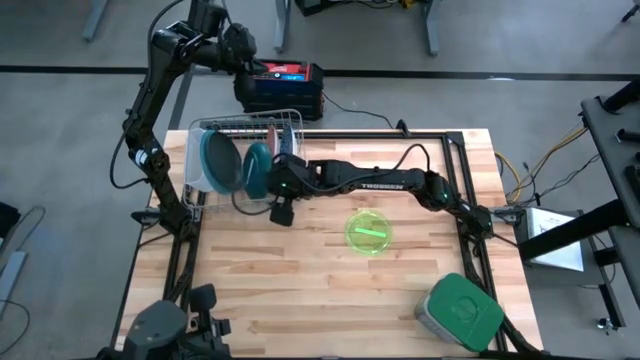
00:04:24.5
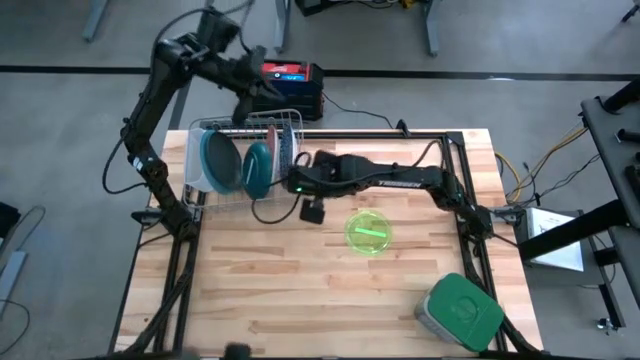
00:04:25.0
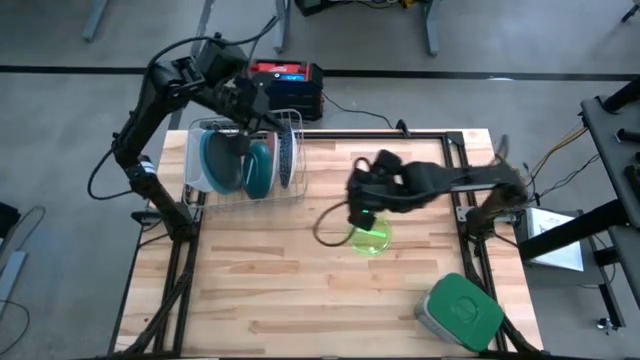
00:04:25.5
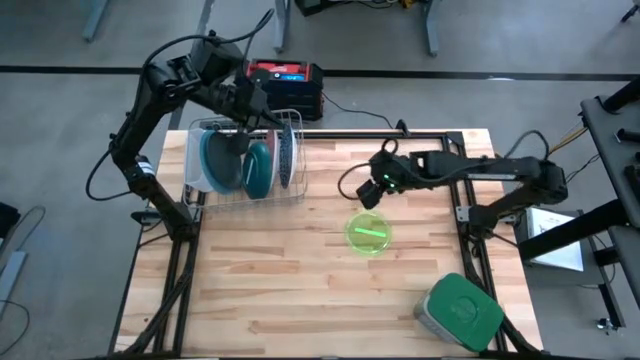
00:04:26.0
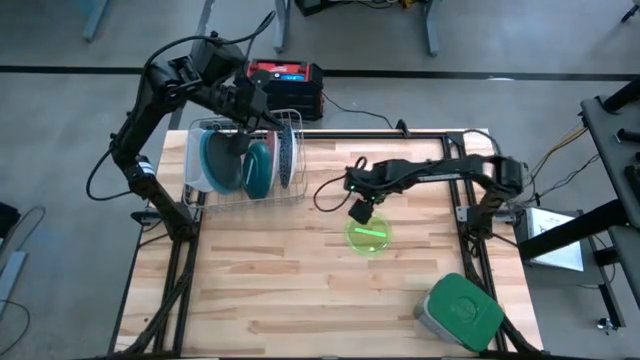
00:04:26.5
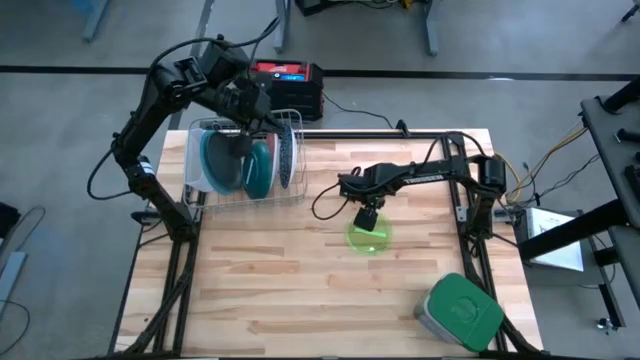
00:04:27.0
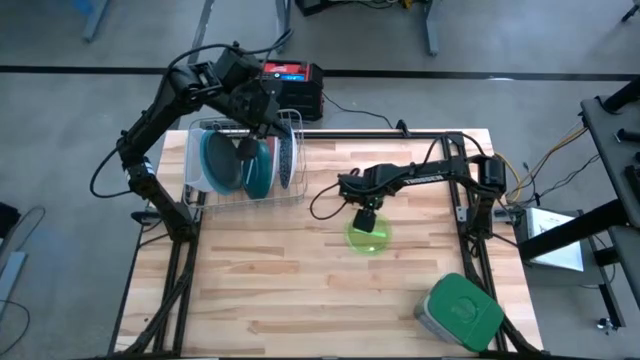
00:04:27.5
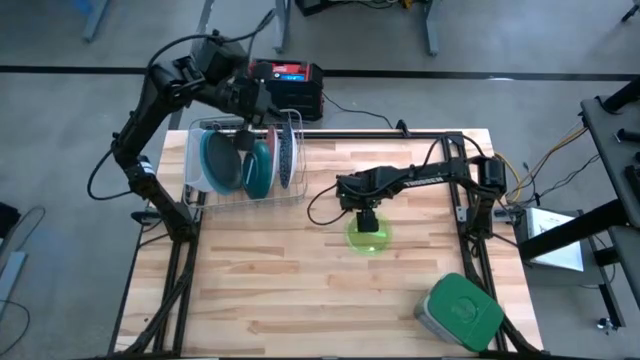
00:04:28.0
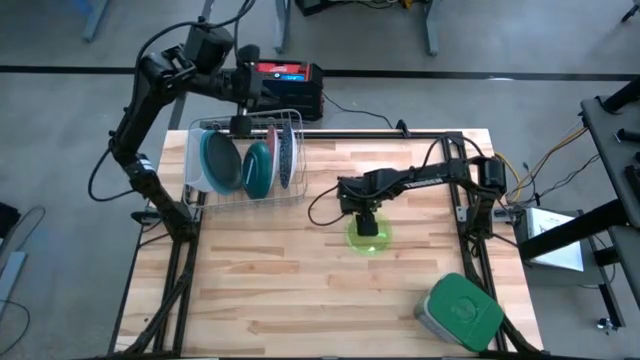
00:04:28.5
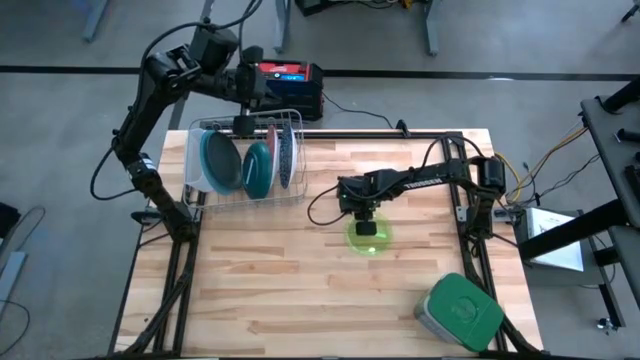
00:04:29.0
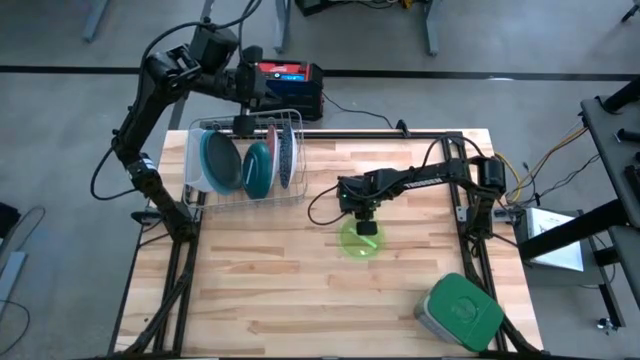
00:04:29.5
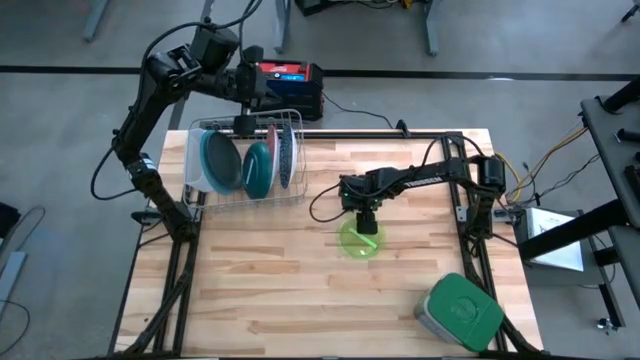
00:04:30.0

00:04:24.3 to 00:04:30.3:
Task: Sort dishes
Put the light green plate into the dish rack

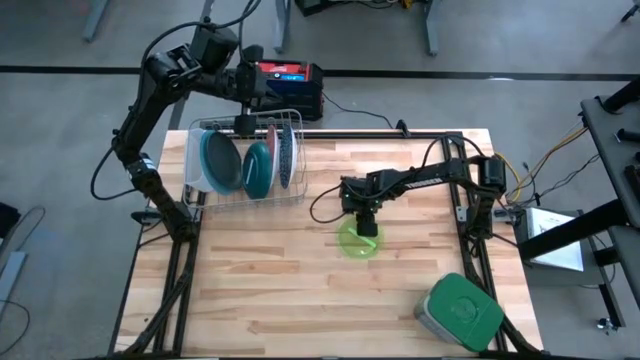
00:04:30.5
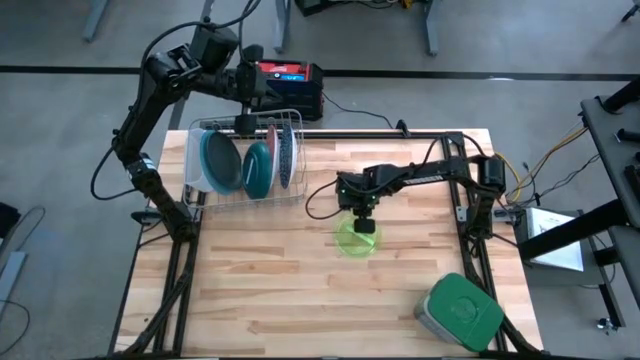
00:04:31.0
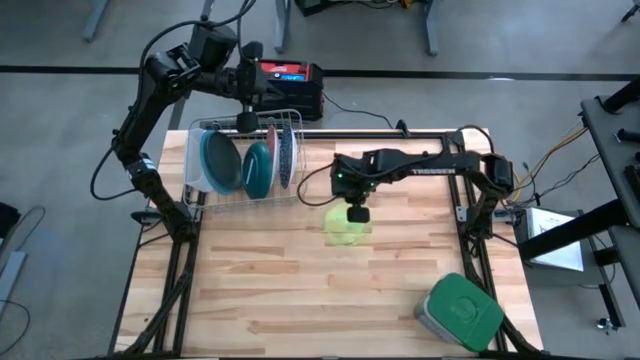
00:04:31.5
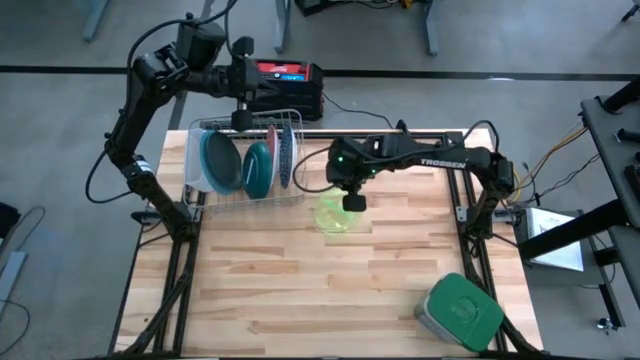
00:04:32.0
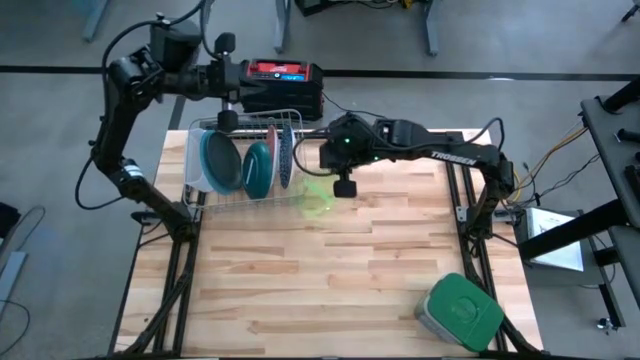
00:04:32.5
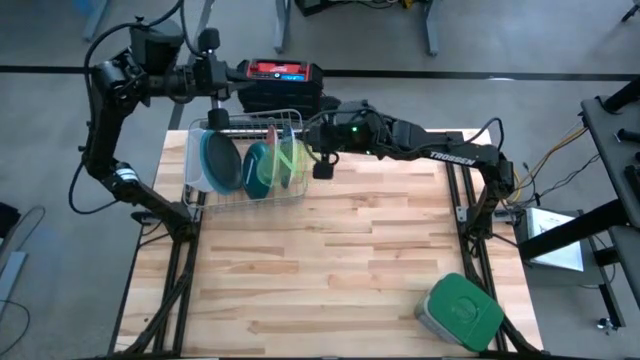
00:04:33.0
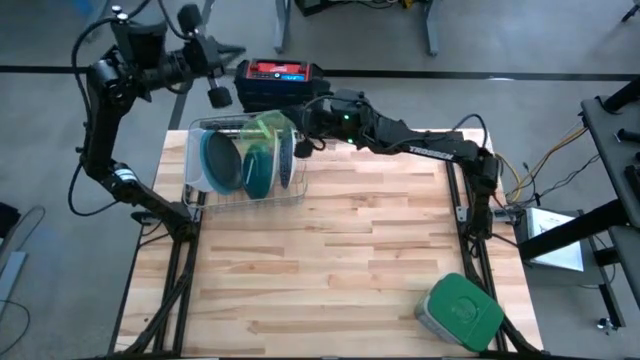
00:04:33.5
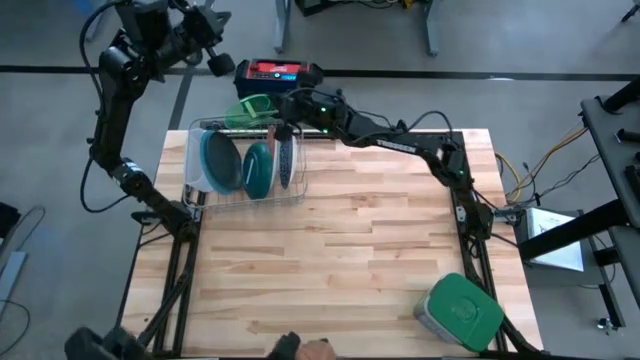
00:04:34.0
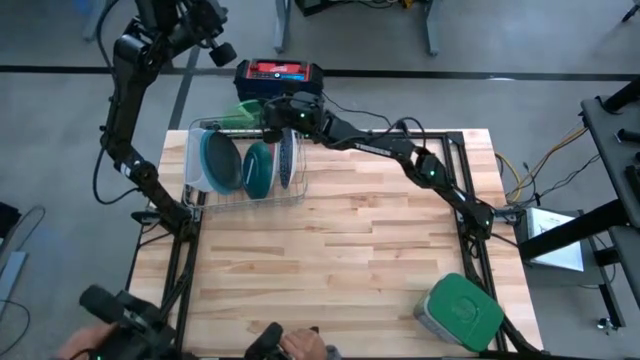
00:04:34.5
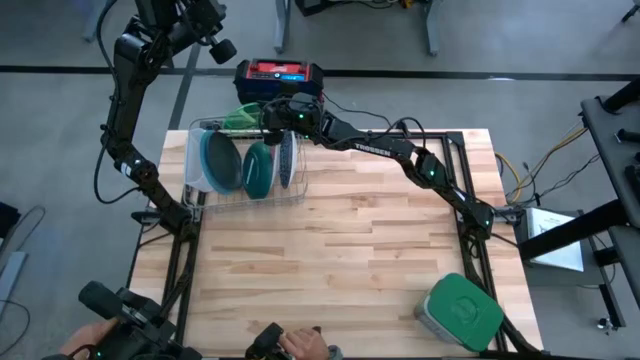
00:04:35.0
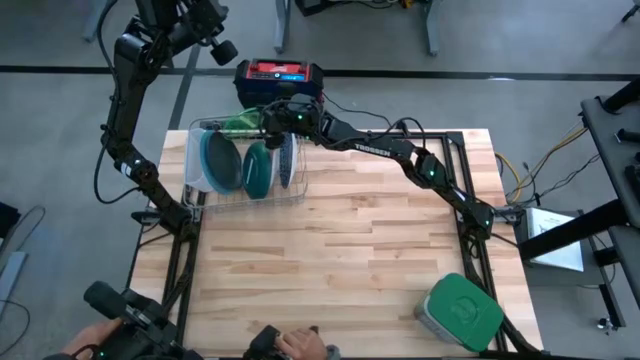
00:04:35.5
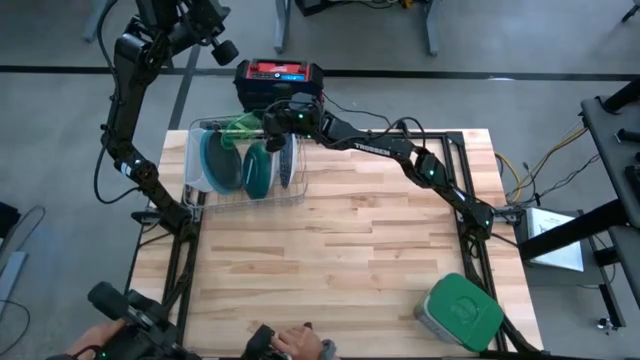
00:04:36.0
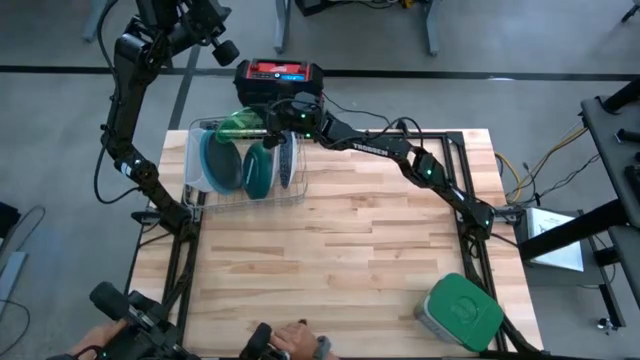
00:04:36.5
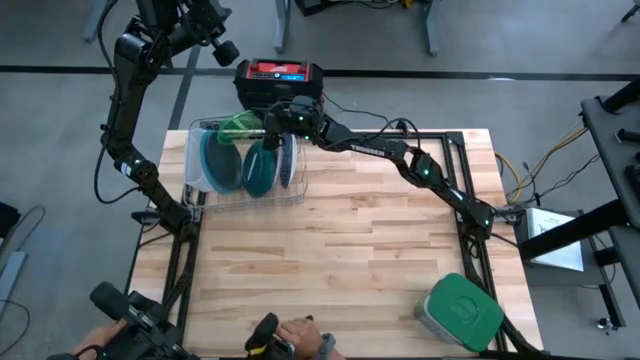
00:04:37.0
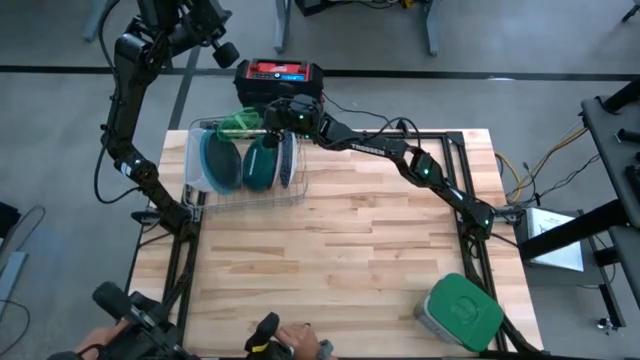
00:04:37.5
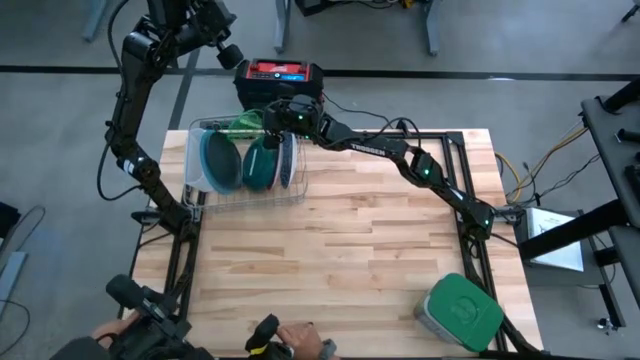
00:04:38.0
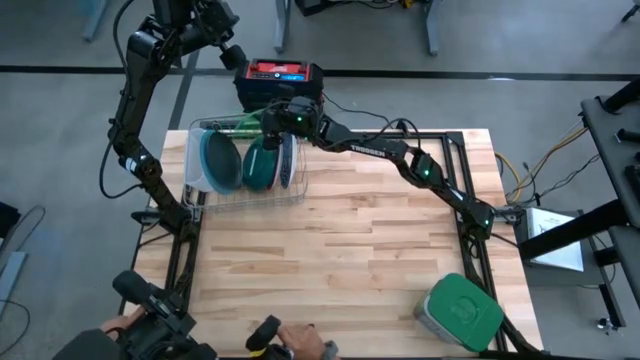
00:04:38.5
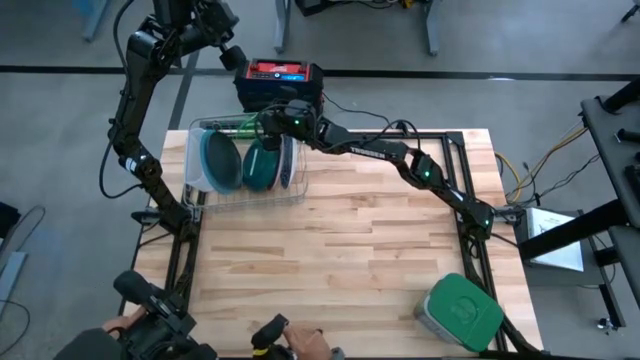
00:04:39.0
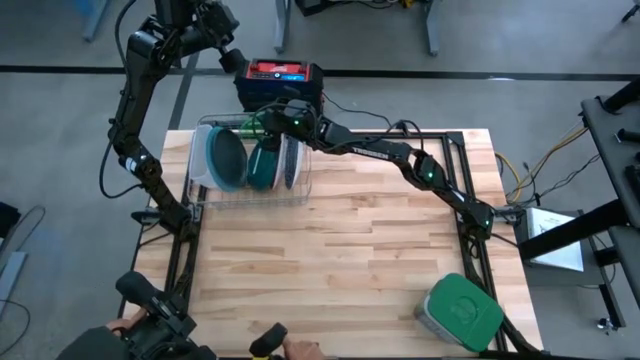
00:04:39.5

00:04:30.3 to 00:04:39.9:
Put the light green plate into the dish rack

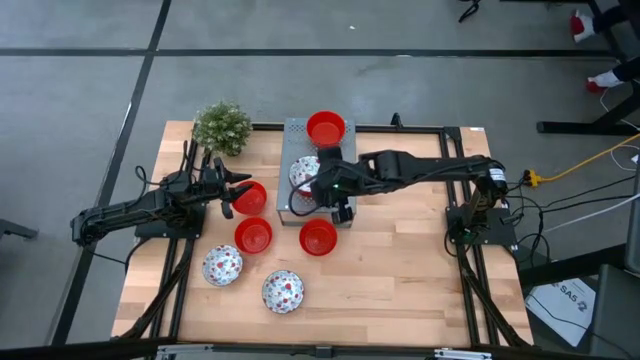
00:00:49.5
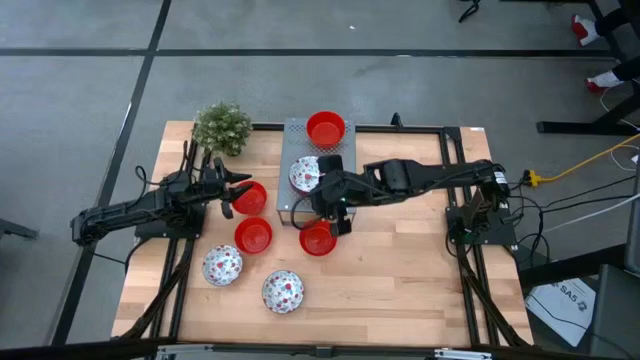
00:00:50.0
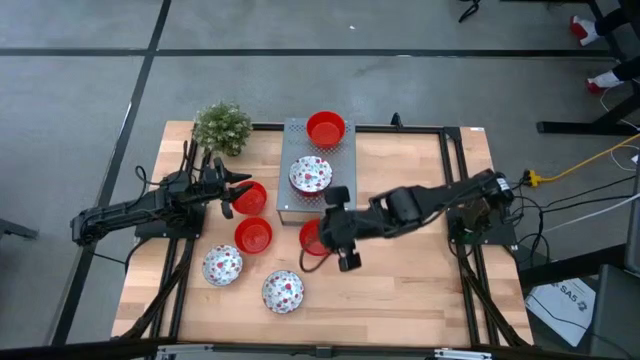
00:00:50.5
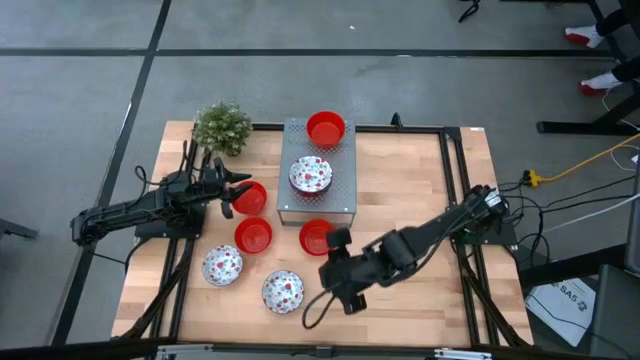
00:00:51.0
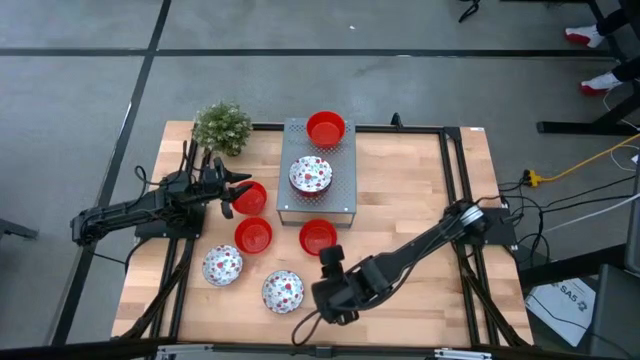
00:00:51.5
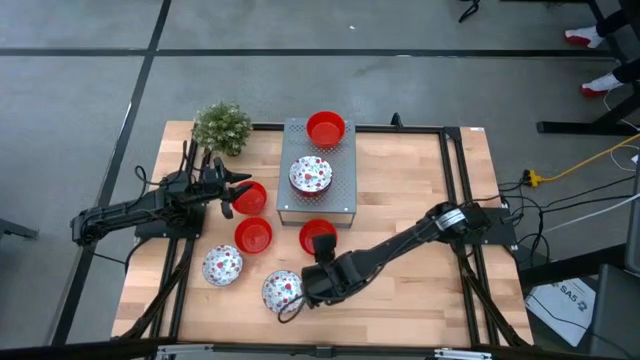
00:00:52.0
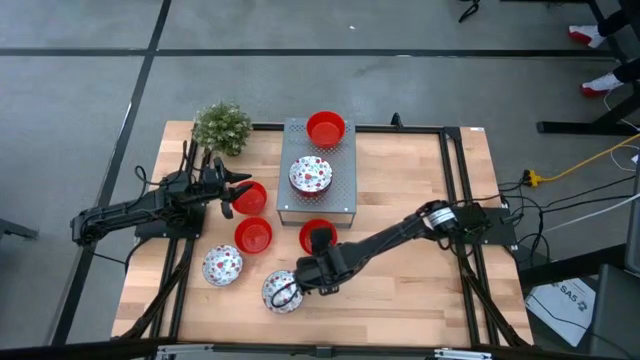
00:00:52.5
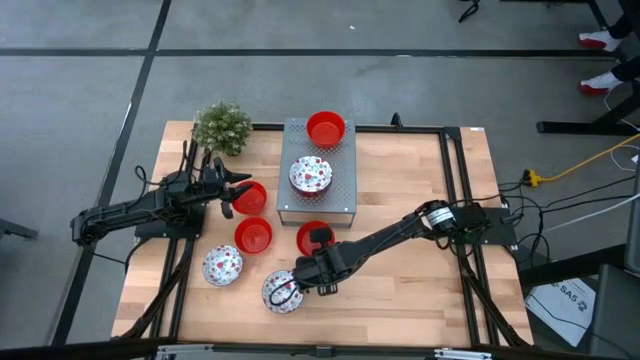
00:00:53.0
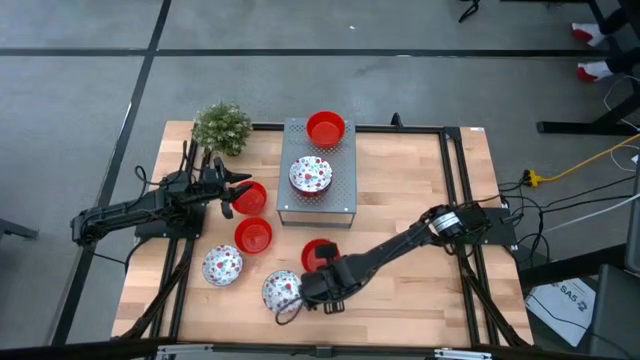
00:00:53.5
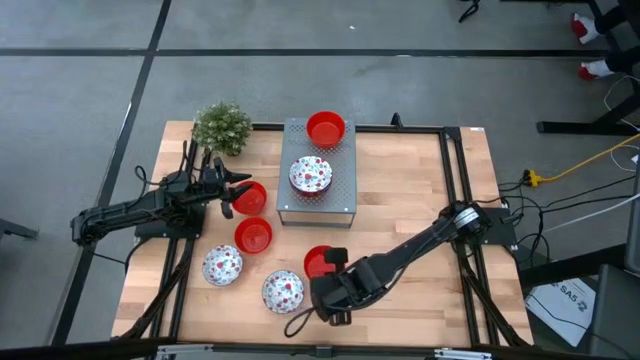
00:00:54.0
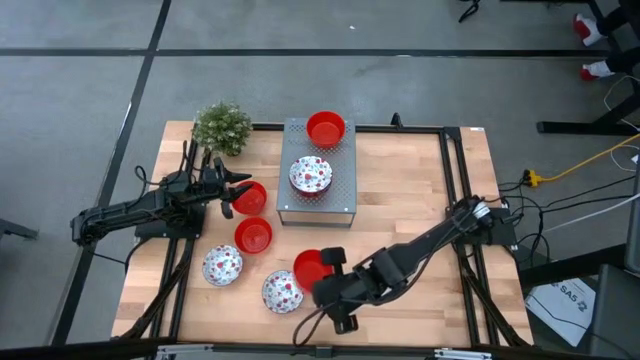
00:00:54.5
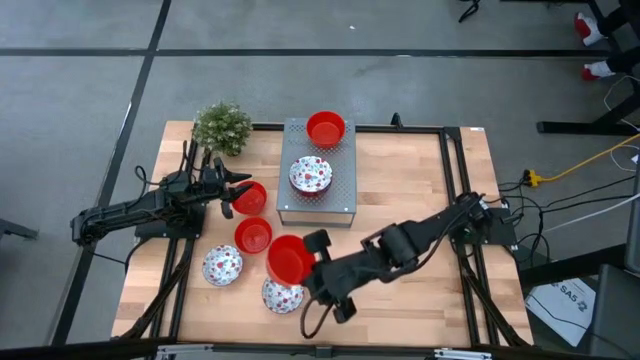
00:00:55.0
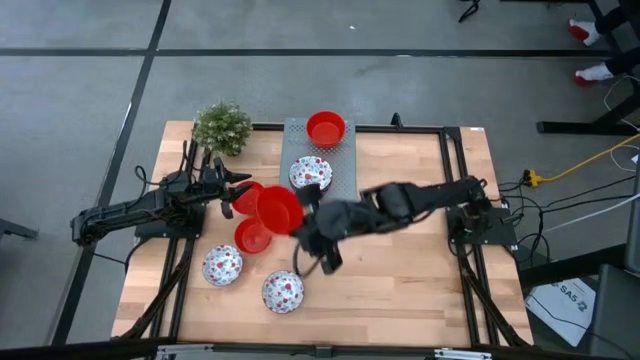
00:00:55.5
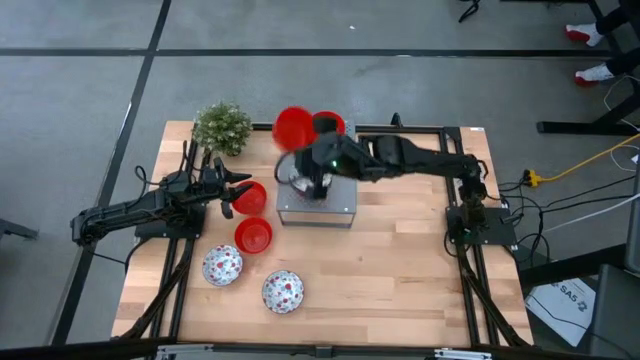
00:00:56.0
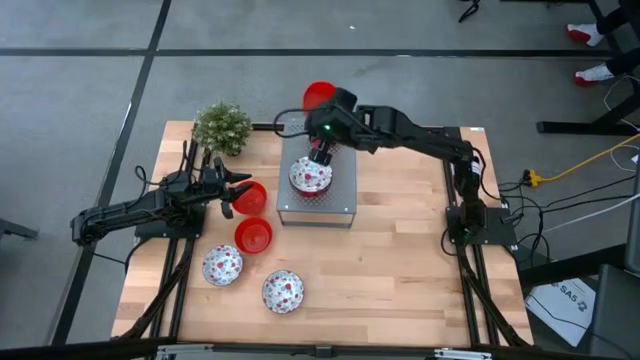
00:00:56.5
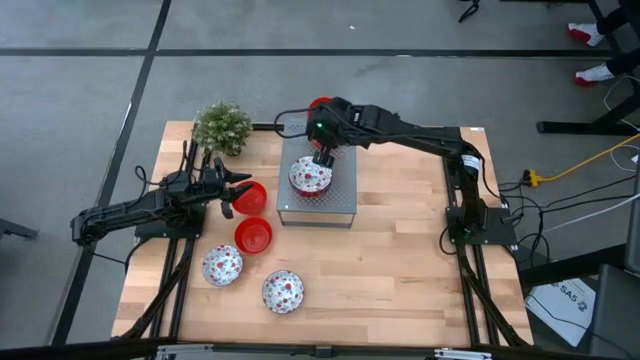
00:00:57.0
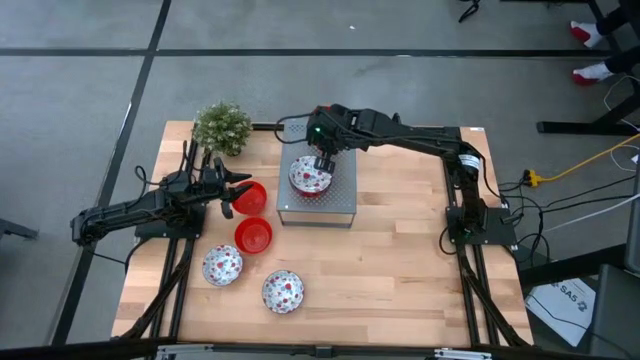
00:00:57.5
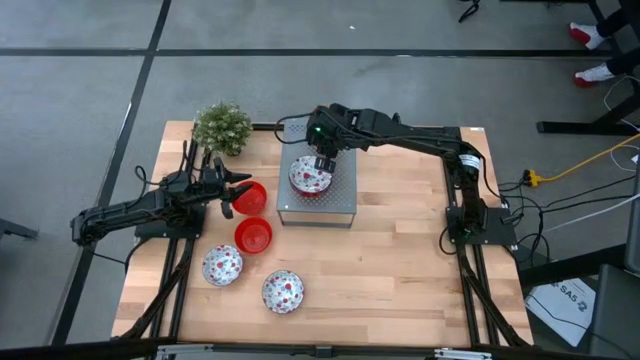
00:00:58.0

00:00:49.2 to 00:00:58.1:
Task: Pick & Place Mini bowls
Stack the red bowl on the red bowl on the shelf
